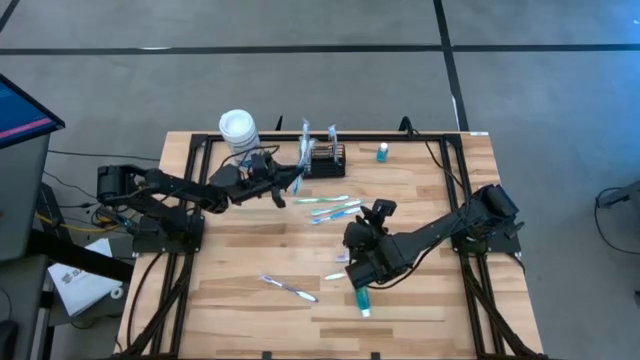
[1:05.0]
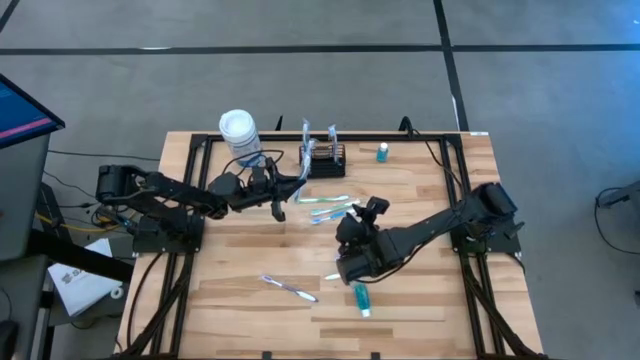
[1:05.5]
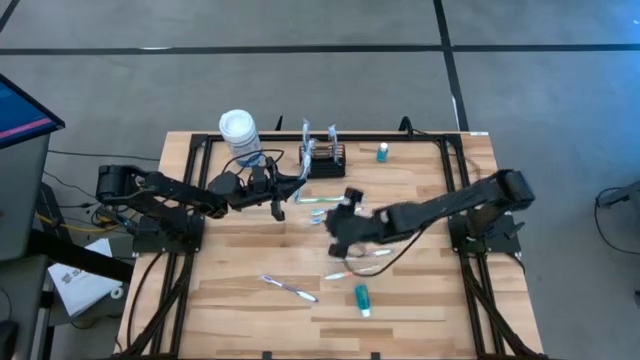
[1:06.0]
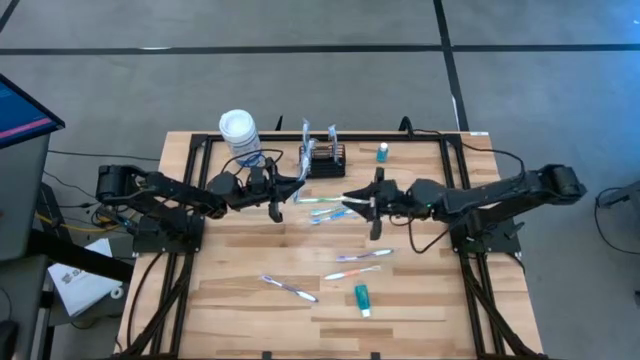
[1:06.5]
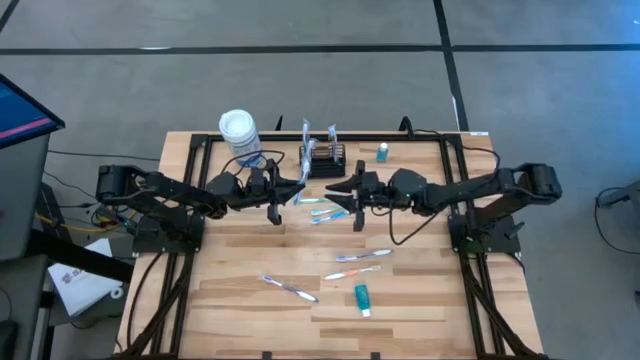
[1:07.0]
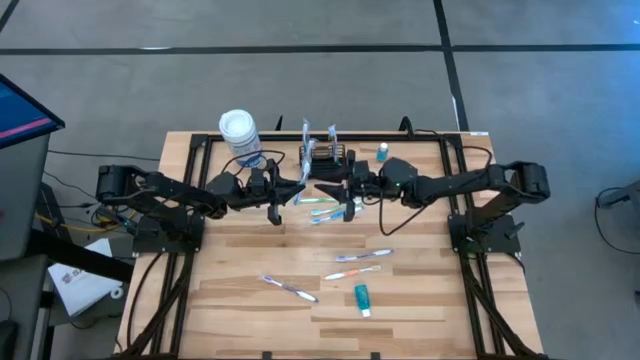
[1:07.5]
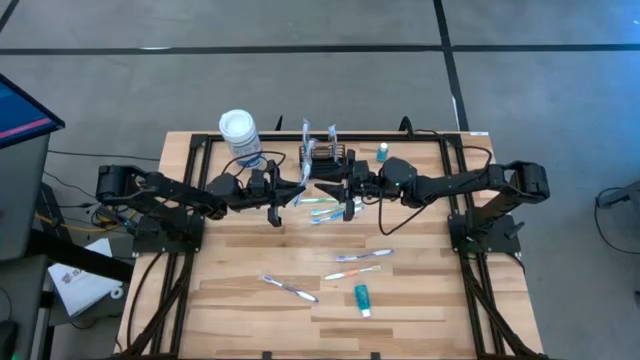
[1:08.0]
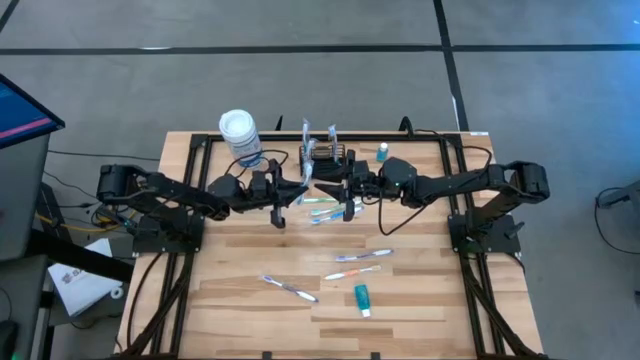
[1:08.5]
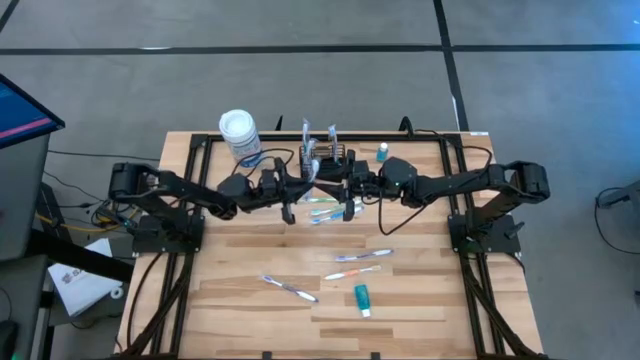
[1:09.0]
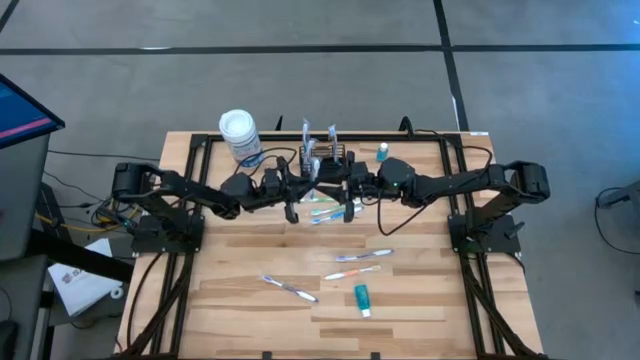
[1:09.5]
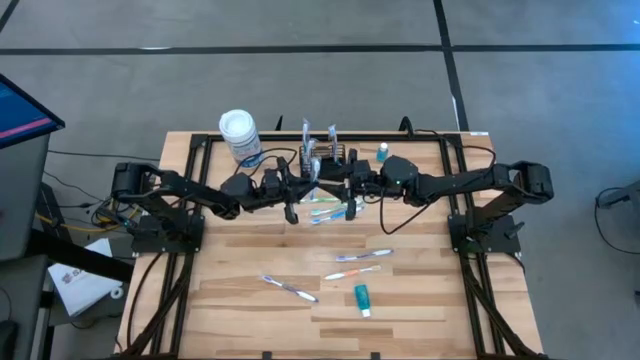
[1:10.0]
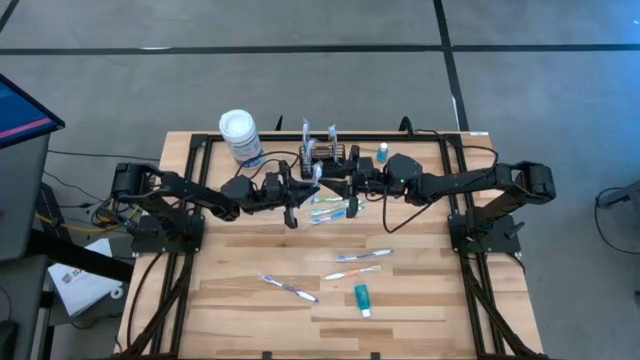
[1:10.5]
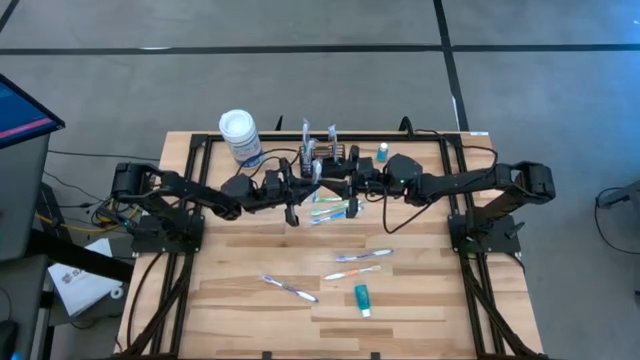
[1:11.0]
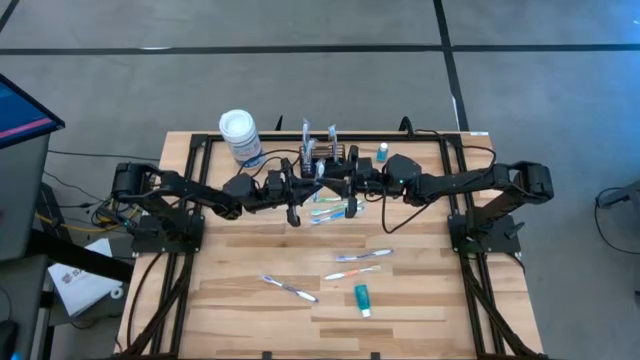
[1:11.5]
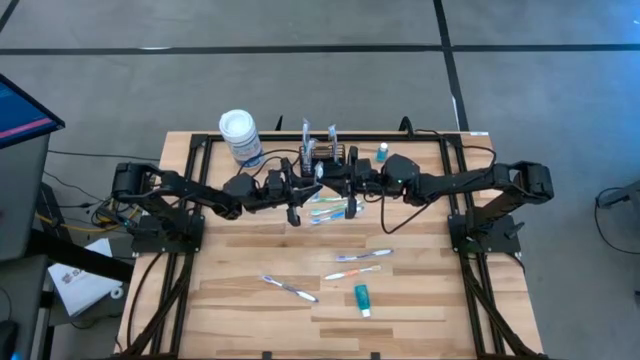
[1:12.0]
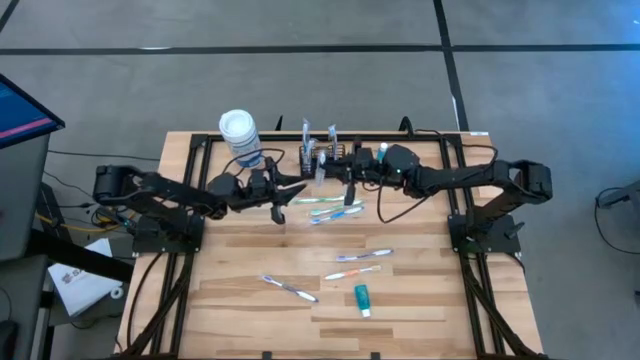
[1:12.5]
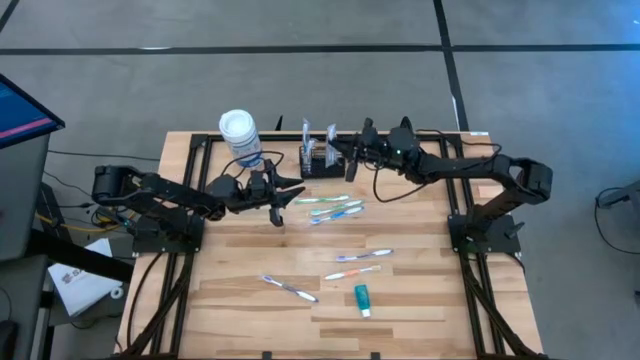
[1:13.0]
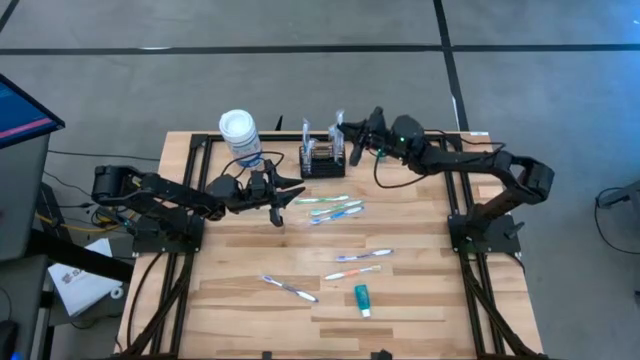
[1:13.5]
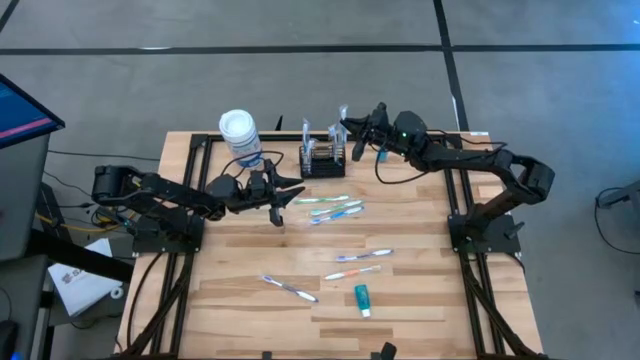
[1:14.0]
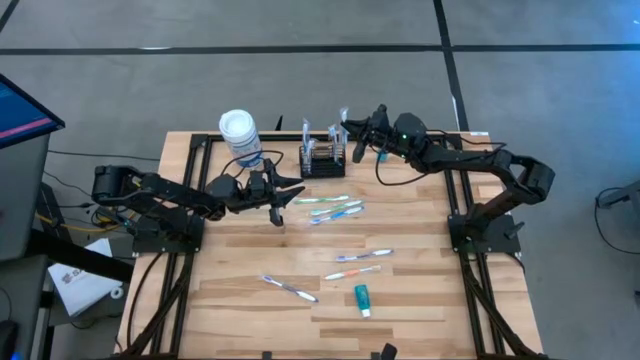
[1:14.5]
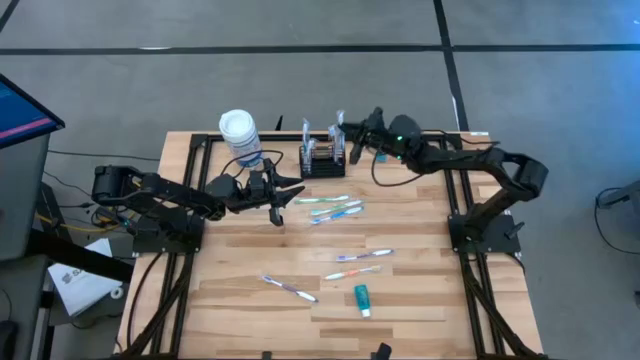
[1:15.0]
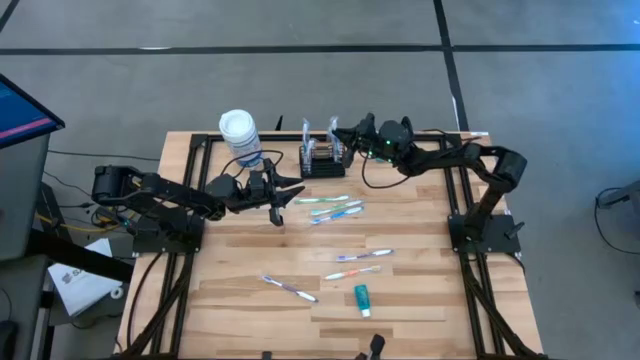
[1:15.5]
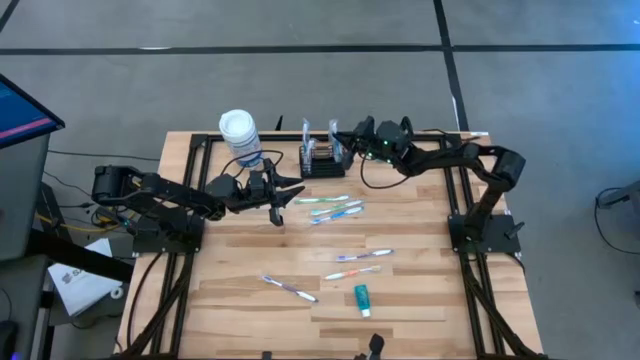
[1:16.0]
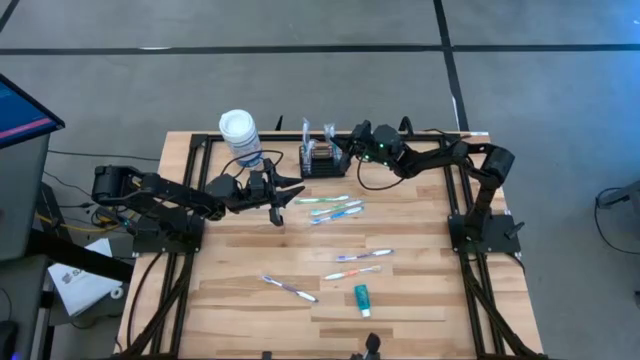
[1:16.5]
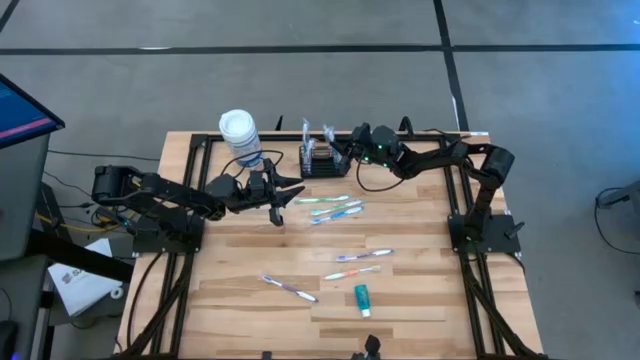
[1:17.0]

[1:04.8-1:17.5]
Task: Pick & Place toothbrushing station
Put the bottom blue toothbrush into the black wire organizer

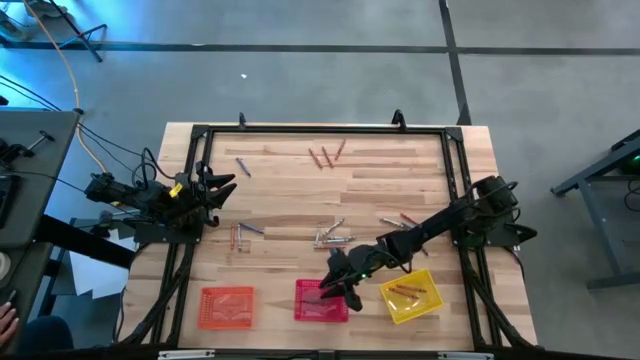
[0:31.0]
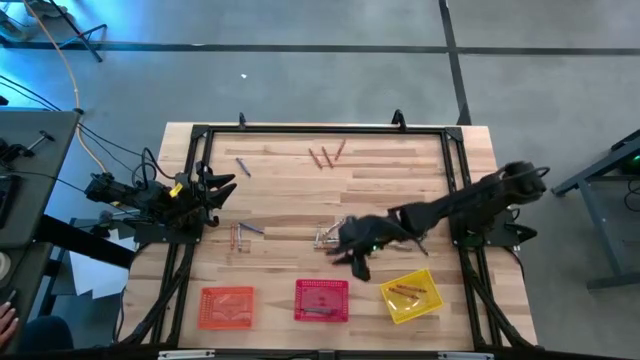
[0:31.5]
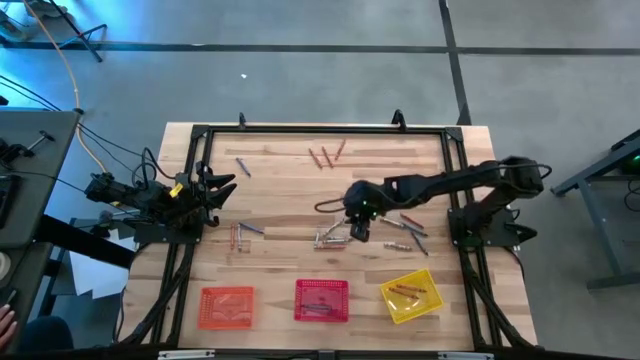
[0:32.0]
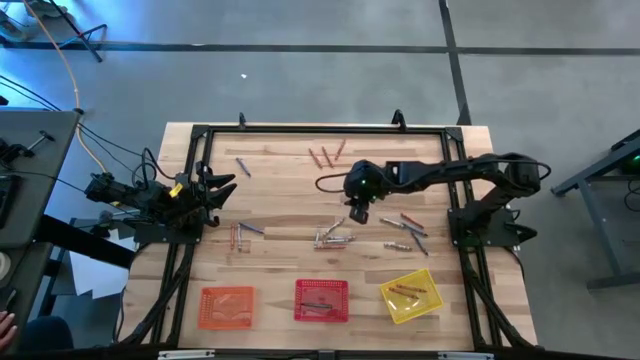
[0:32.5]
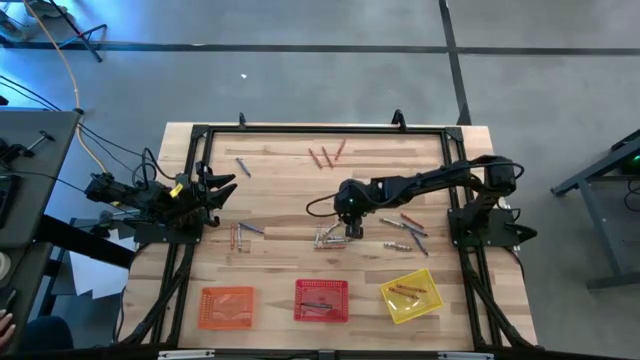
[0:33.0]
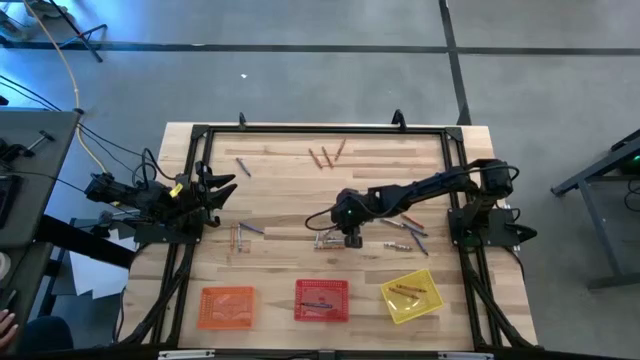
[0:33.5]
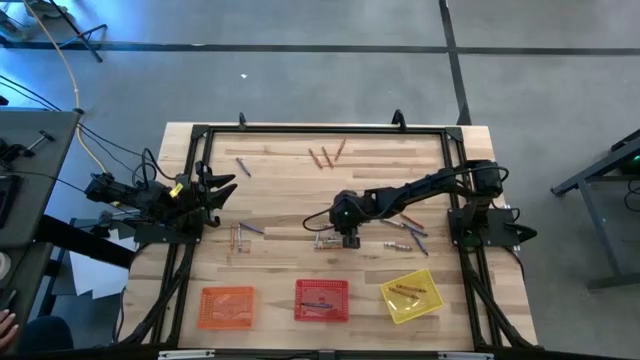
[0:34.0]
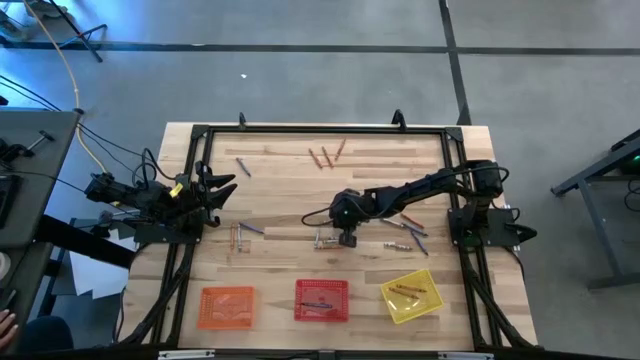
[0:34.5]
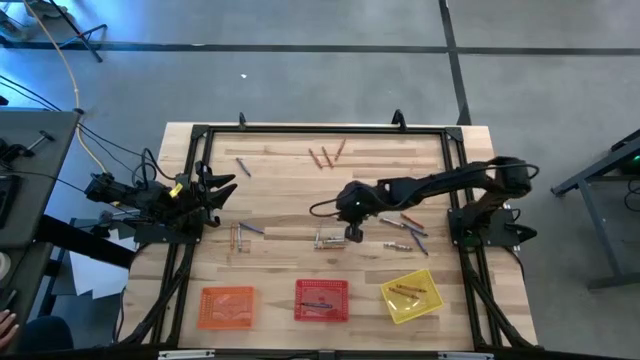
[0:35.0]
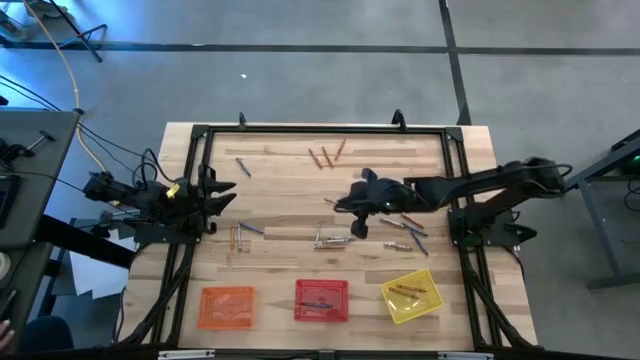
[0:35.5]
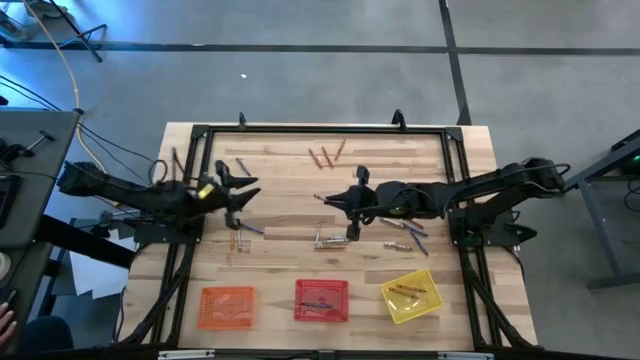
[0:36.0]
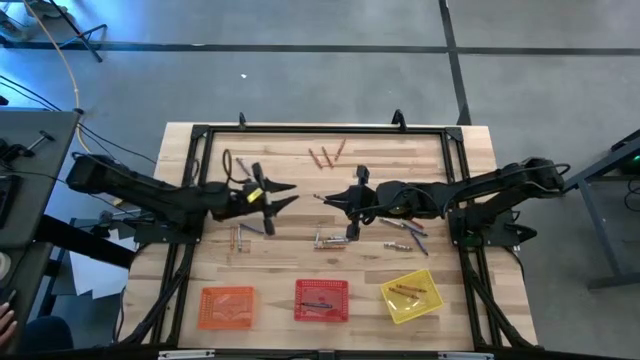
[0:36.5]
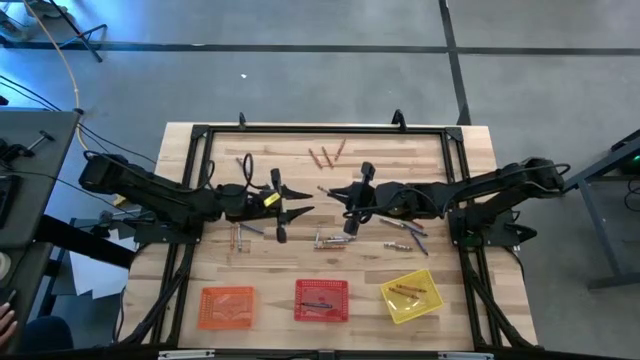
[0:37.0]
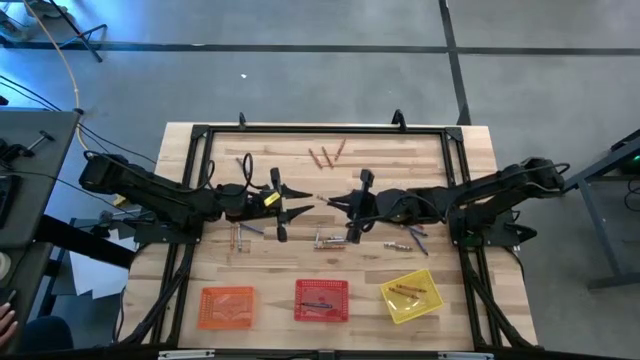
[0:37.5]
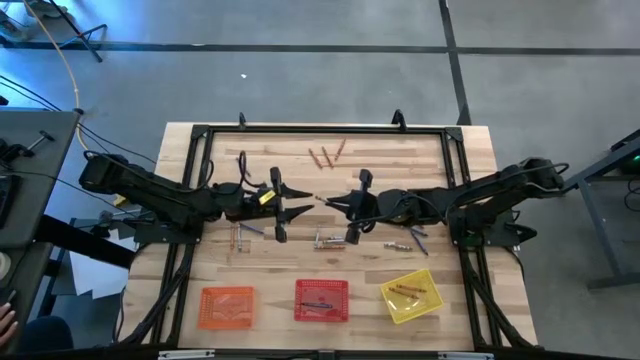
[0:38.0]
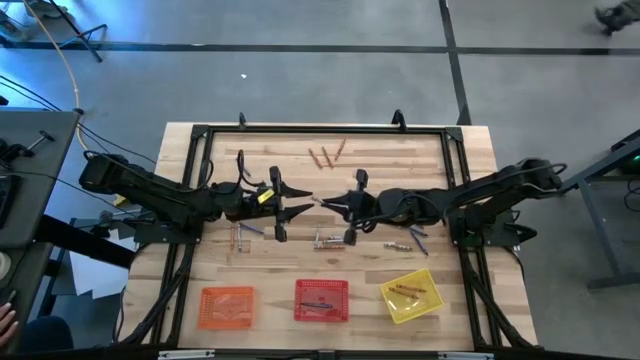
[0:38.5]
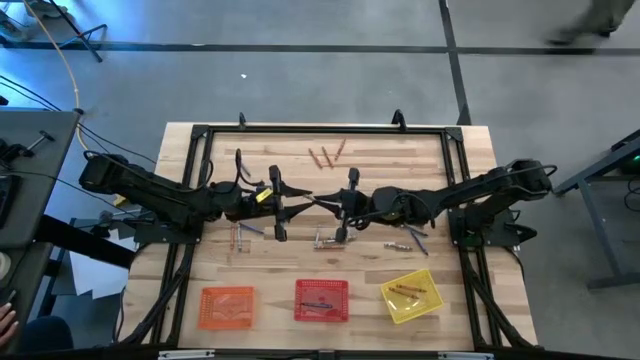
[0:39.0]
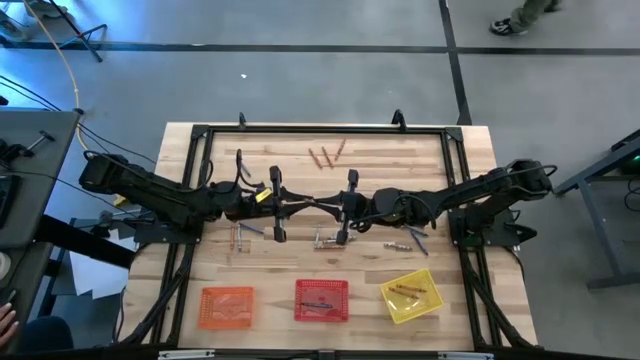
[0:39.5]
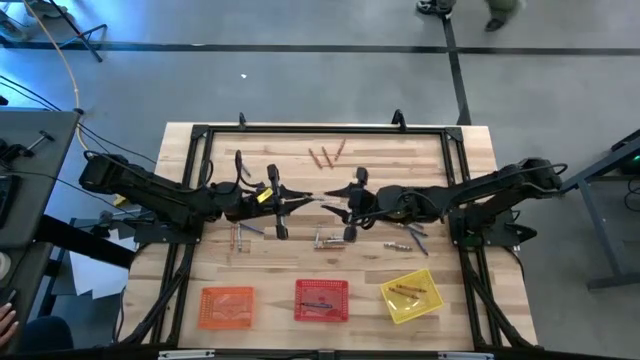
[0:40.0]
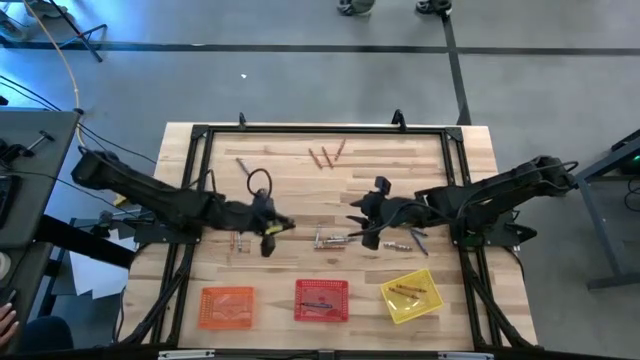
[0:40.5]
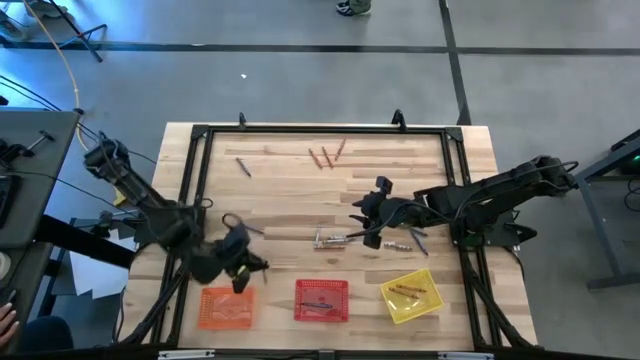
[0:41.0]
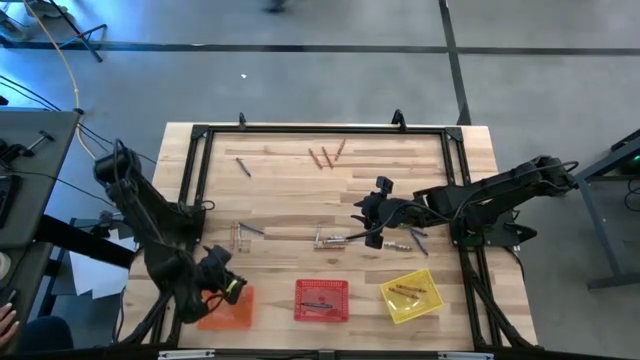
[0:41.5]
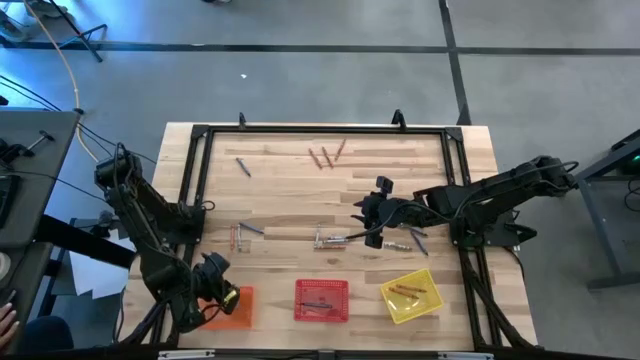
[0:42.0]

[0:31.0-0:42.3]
Task: Sort crayons
Put the gray crayon into the orange bin
